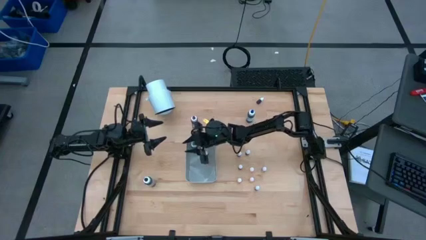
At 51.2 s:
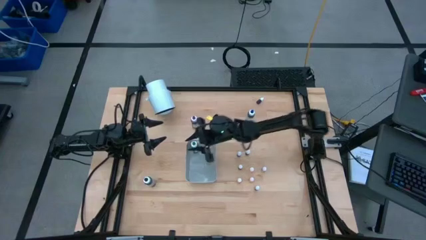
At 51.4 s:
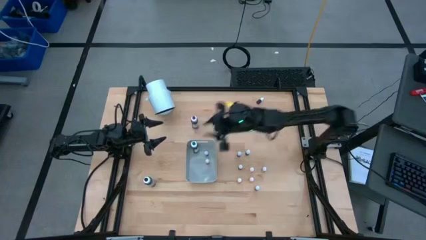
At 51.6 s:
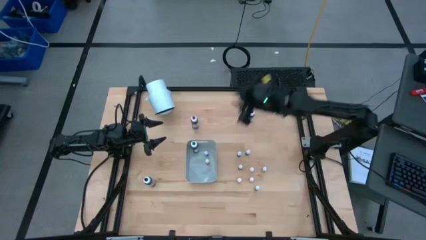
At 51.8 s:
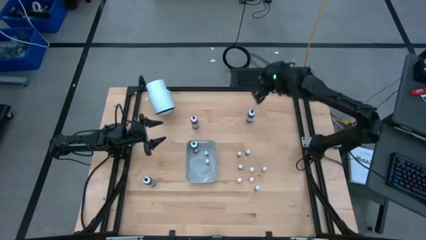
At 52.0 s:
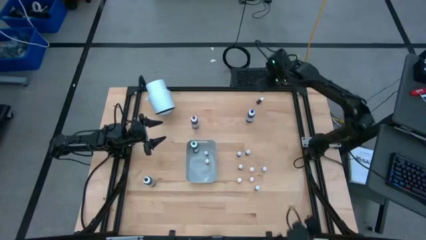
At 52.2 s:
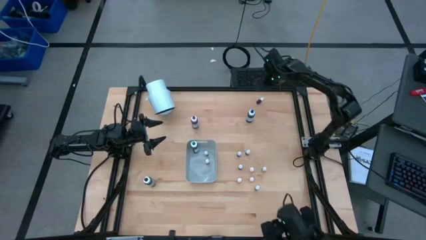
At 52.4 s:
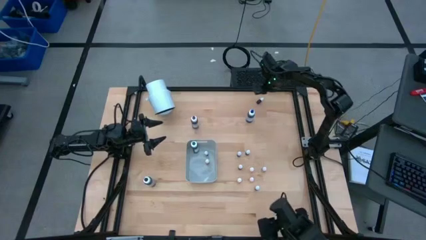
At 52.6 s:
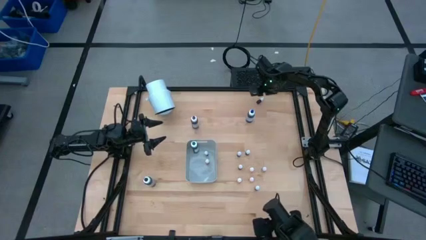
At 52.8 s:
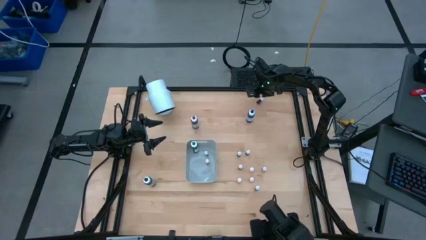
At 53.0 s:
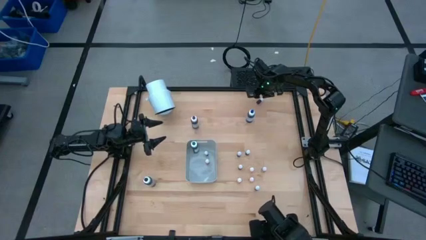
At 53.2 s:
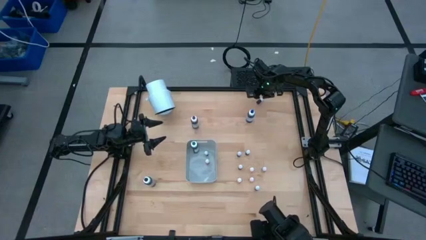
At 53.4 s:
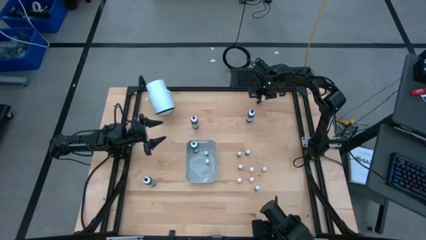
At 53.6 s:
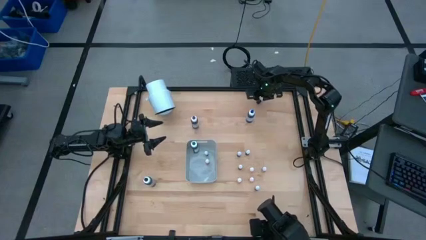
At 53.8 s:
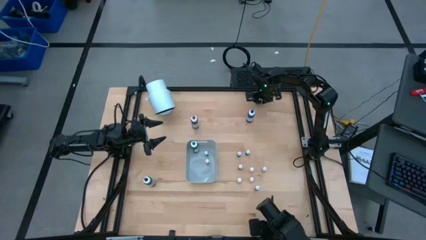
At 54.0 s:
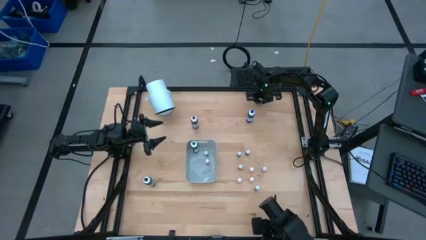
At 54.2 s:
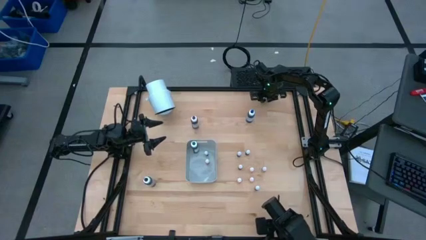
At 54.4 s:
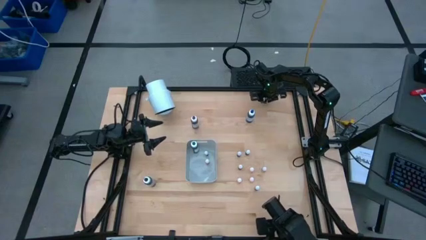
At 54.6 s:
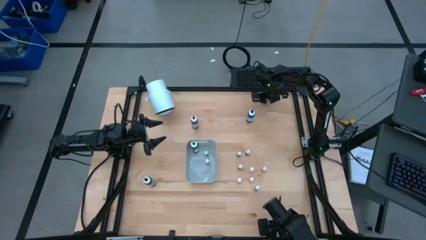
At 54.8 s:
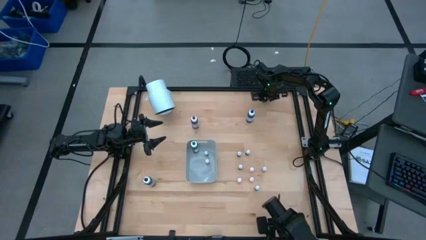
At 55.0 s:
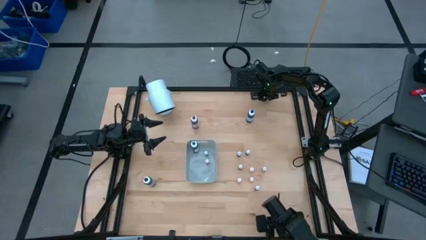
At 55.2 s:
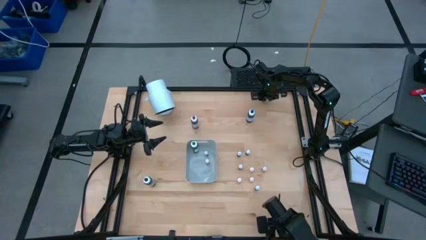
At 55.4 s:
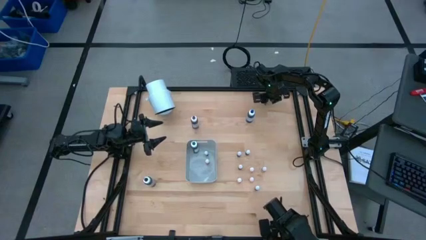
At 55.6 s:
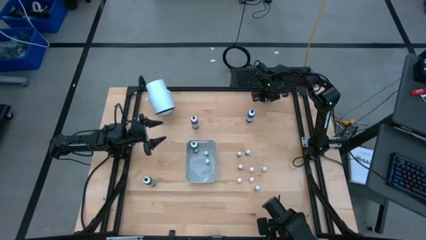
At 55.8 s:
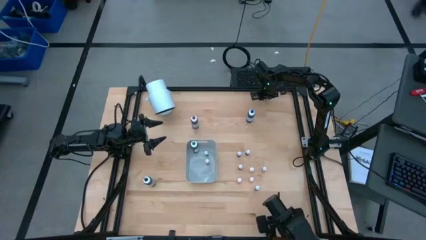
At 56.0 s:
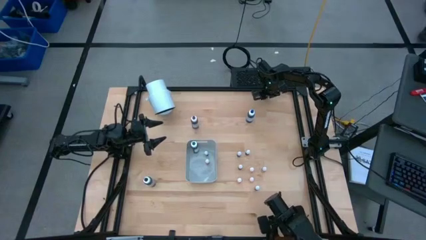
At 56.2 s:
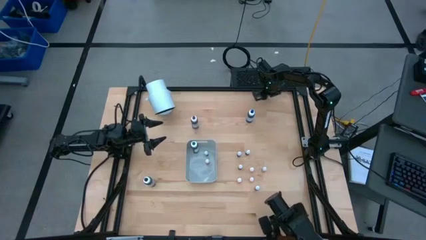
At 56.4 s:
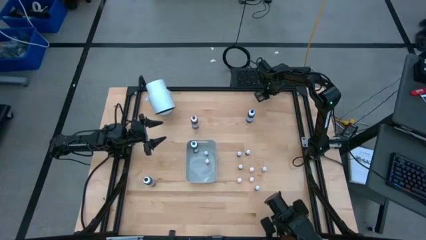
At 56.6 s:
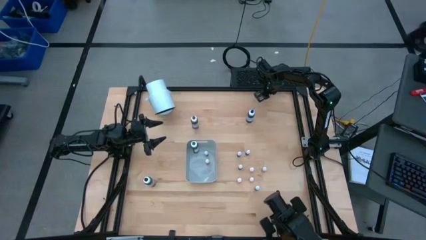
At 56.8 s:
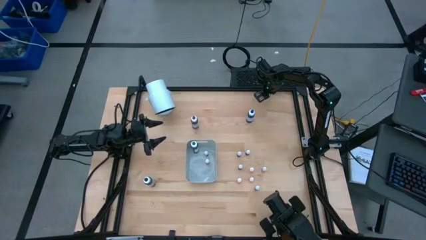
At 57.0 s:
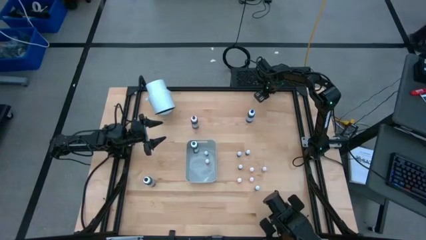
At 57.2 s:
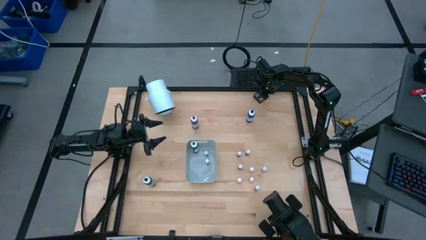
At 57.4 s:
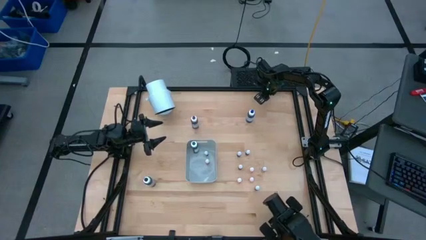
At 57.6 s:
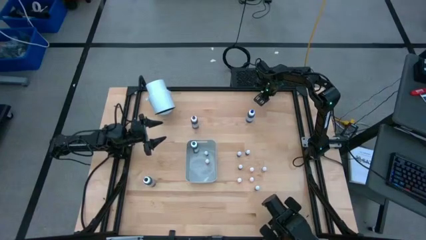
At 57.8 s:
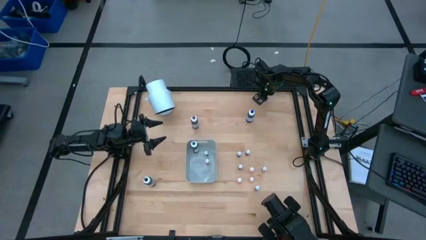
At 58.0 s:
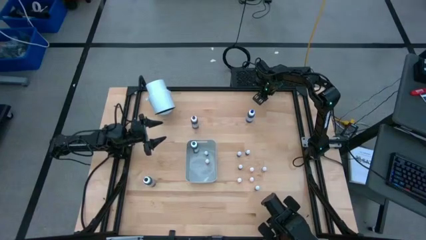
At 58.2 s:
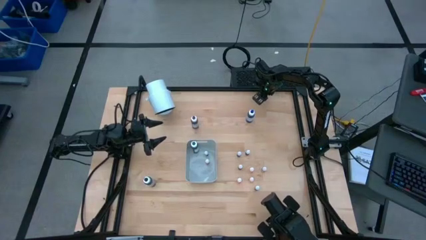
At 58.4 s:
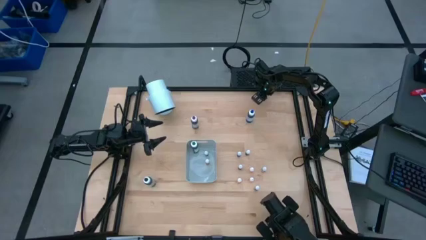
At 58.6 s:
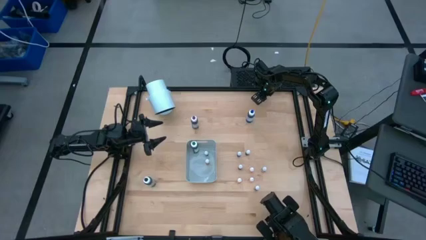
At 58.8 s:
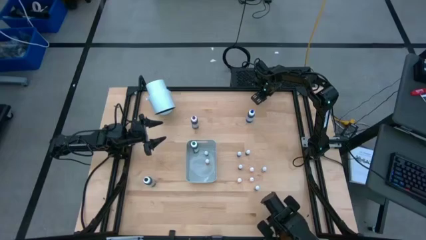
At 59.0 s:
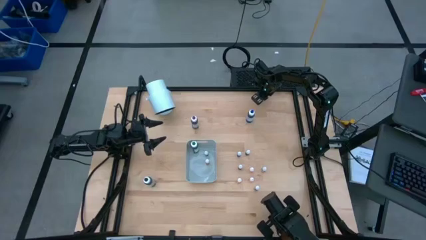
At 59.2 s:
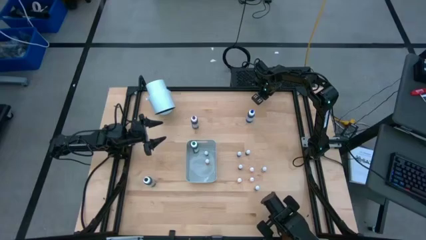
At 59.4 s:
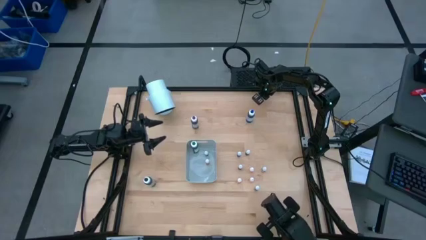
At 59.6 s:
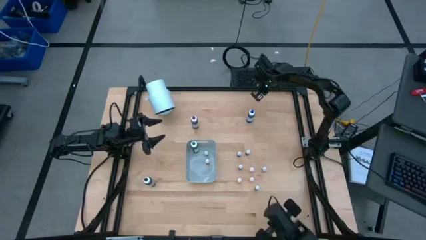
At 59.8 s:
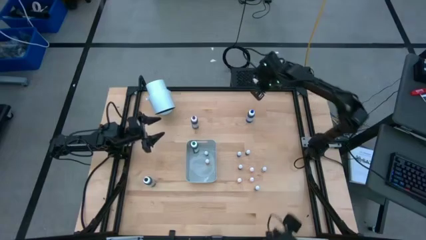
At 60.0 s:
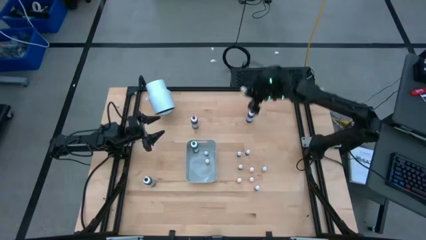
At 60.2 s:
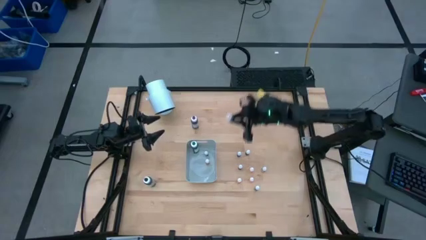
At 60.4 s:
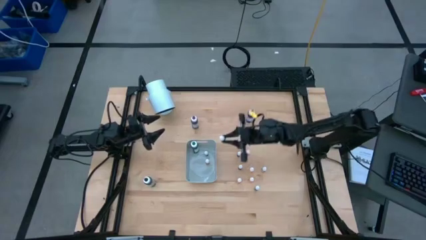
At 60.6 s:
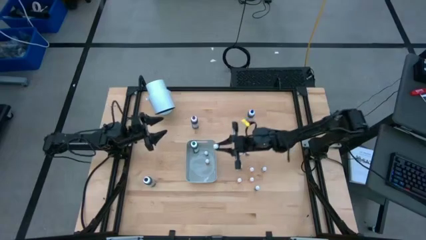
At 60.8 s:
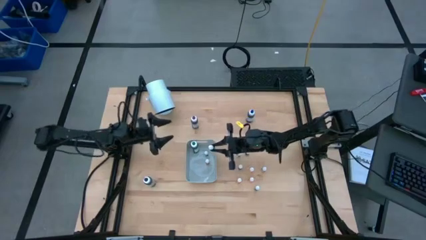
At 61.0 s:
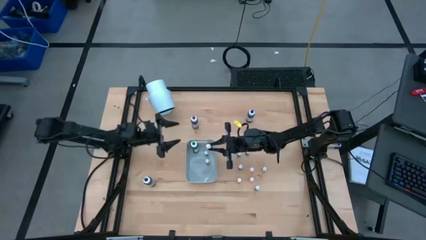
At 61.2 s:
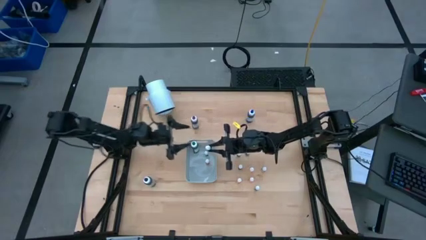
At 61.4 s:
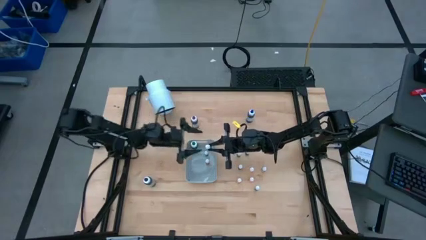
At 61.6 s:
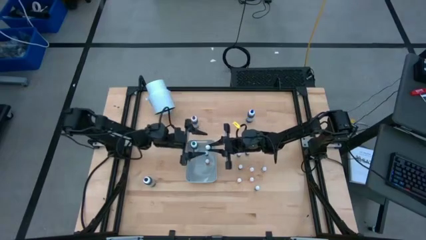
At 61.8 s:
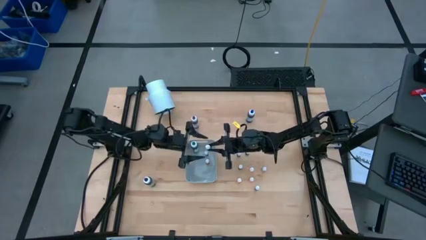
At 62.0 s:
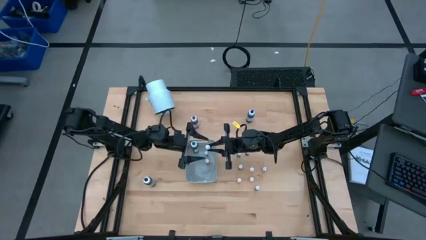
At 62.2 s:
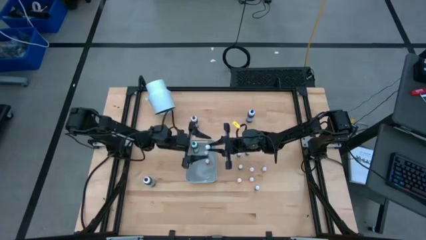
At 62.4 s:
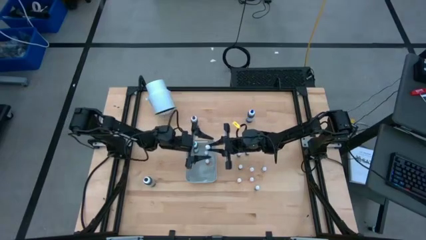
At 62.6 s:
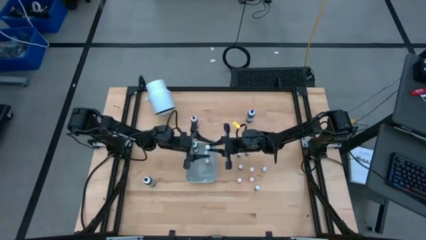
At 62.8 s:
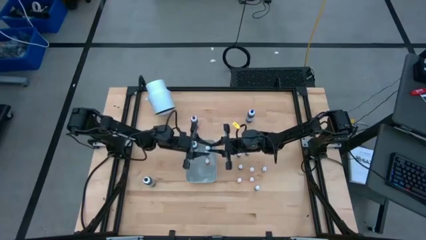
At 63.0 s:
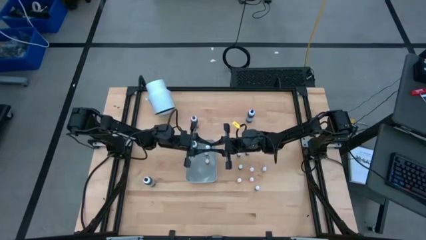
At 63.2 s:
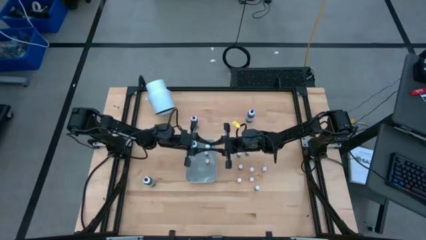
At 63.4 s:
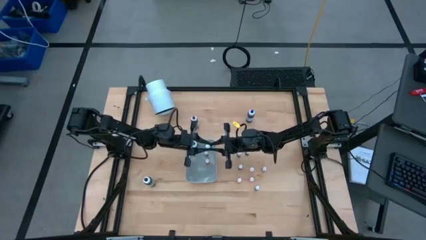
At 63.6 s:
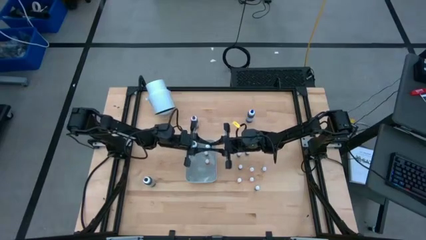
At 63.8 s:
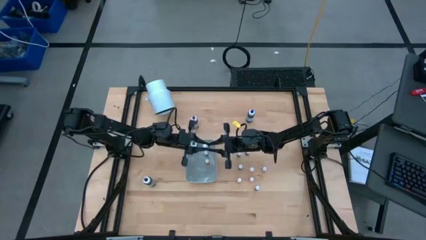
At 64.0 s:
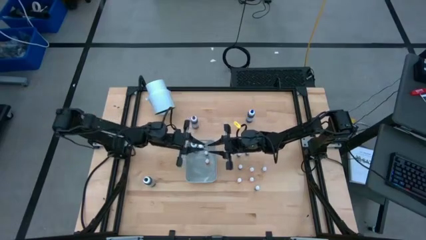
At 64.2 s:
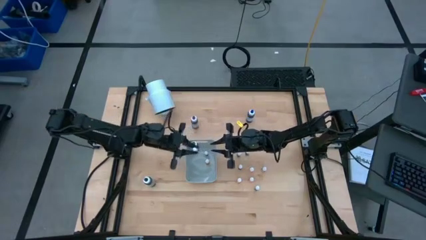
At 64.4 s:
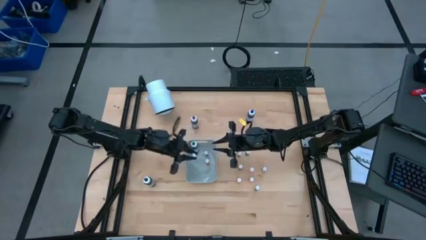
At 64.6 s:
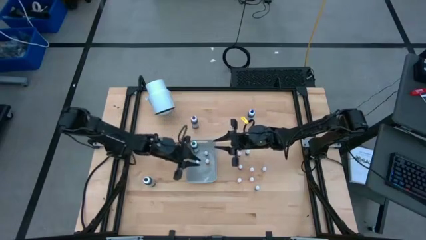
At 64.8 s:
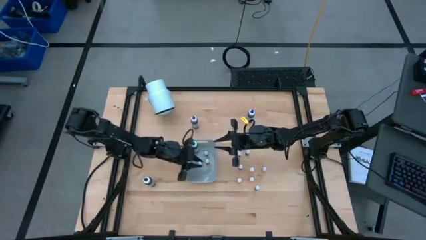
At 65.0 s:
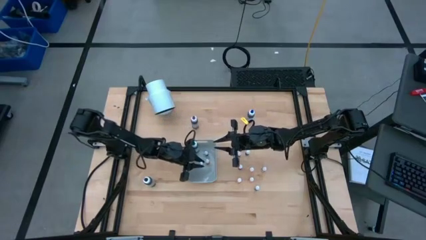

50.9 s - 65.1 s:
Task: Pick & Place food coloring
Put the red food coloring bottle into the bin
